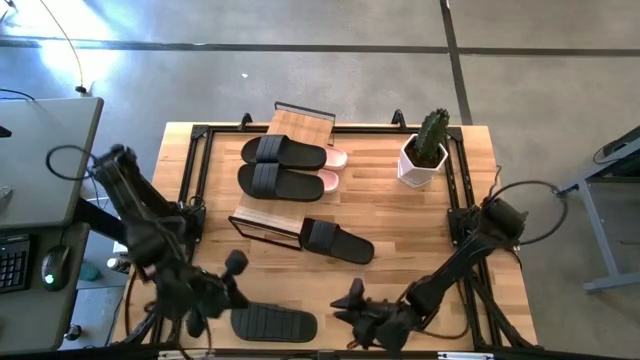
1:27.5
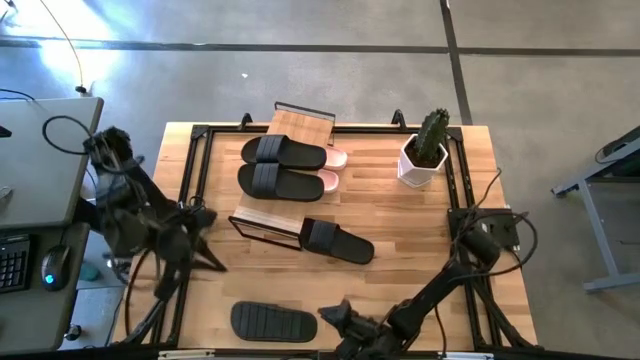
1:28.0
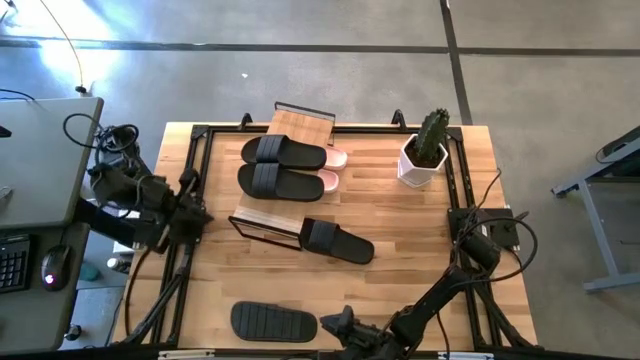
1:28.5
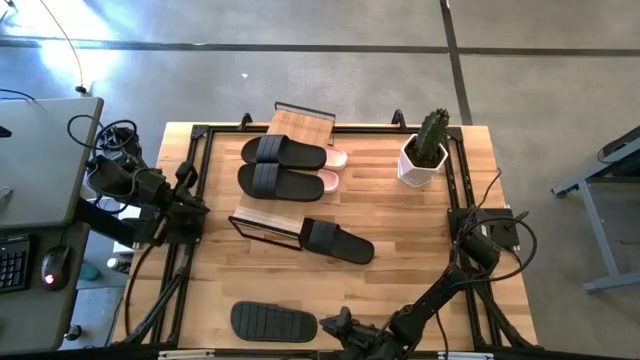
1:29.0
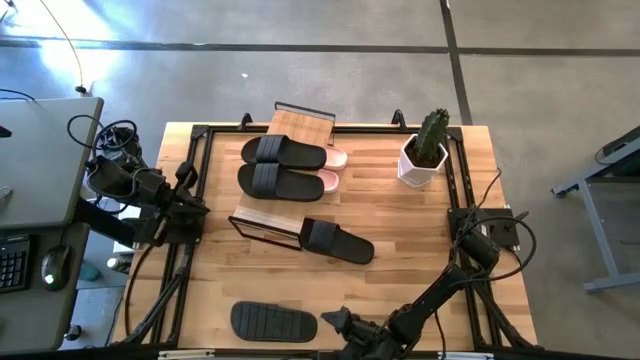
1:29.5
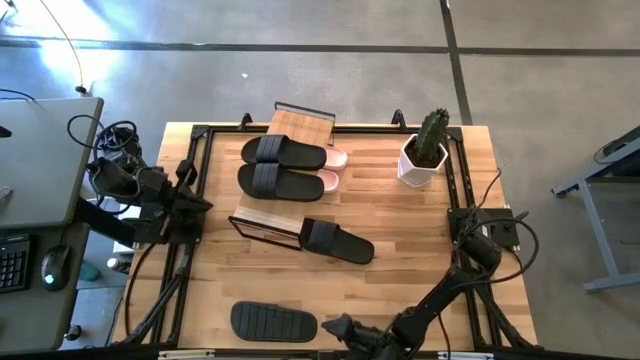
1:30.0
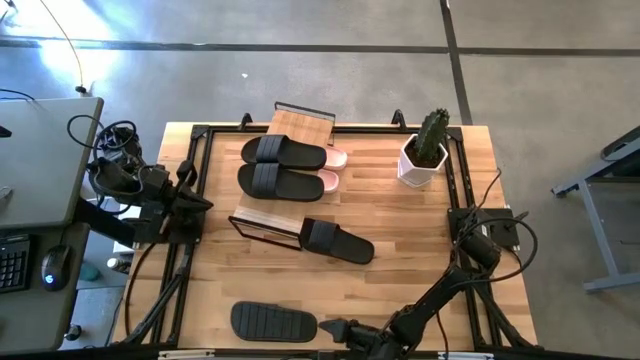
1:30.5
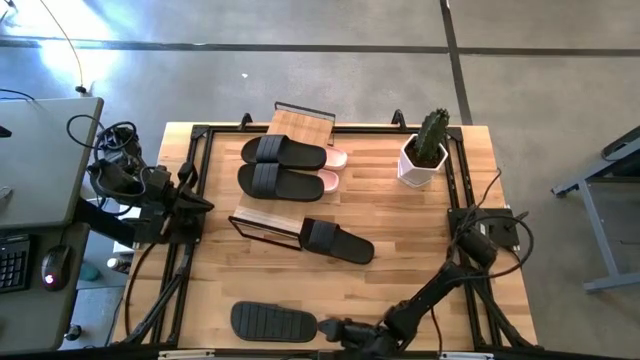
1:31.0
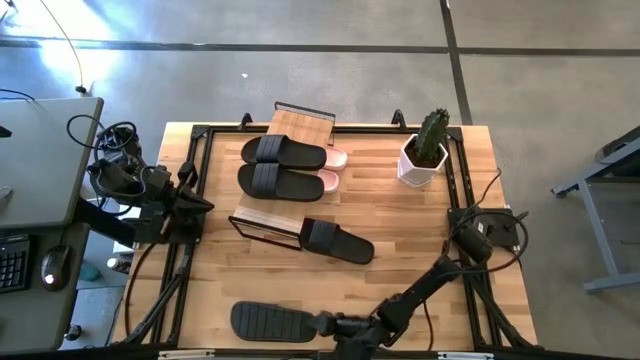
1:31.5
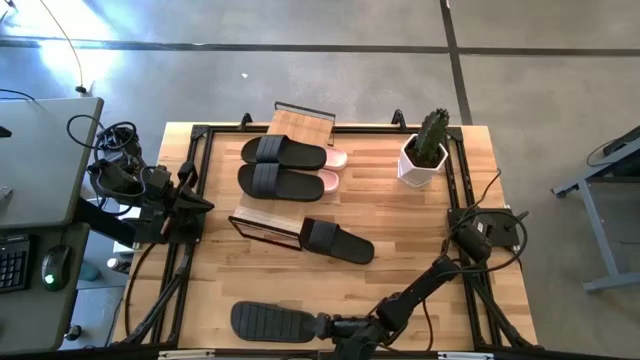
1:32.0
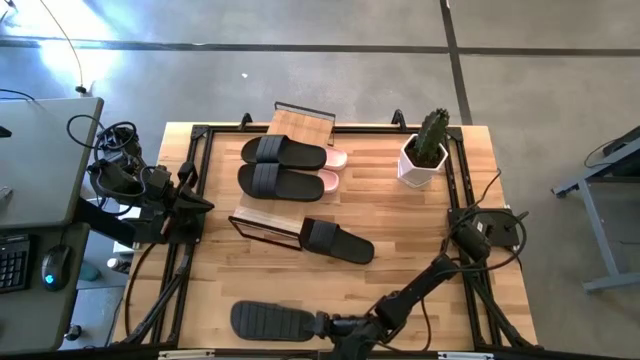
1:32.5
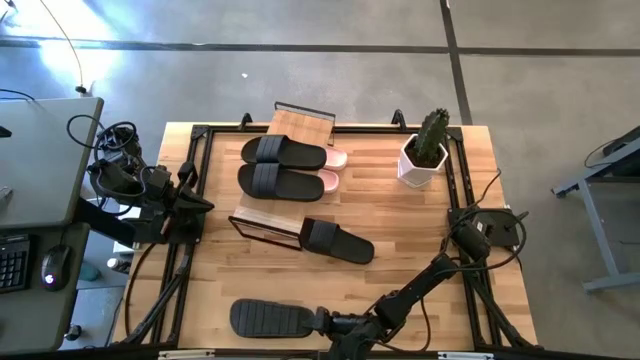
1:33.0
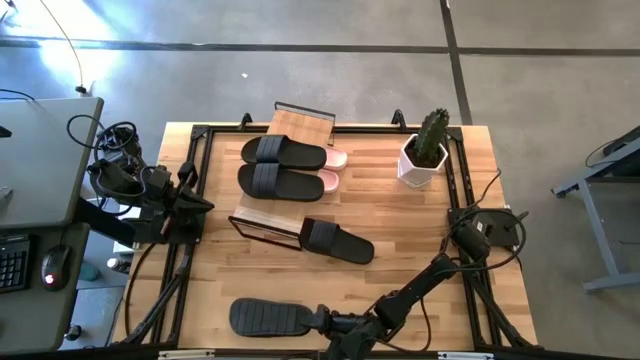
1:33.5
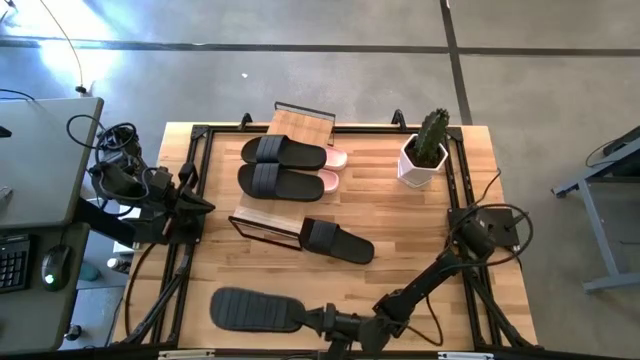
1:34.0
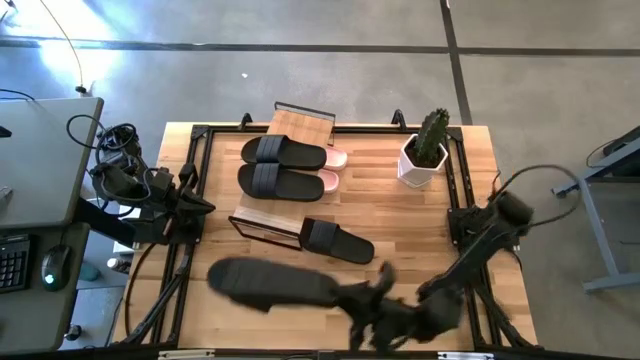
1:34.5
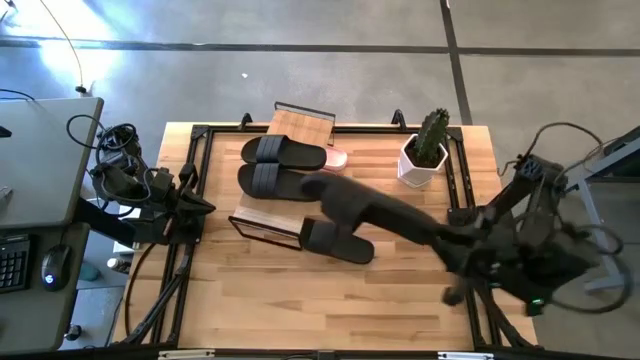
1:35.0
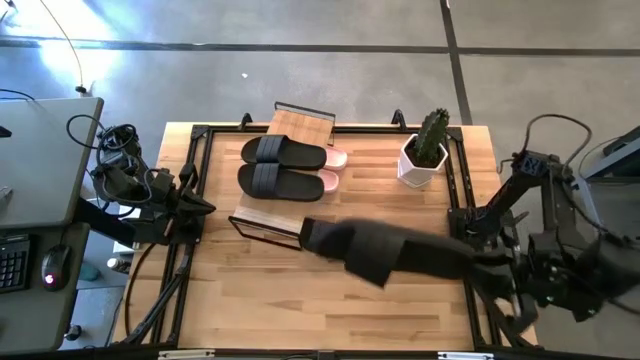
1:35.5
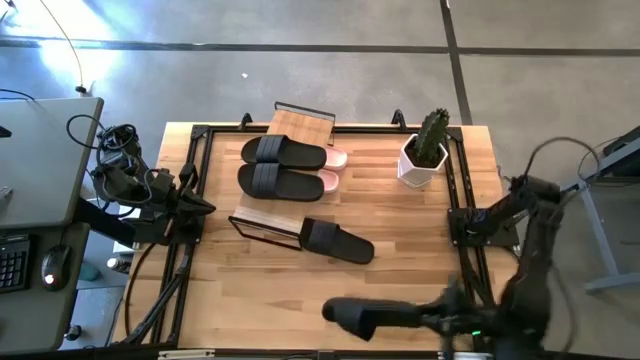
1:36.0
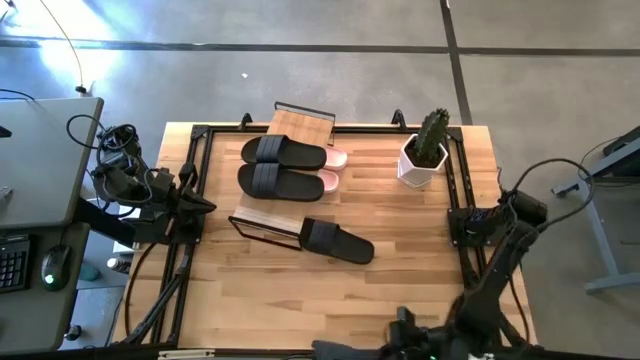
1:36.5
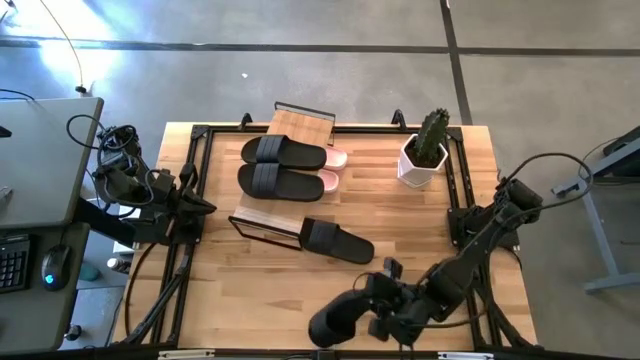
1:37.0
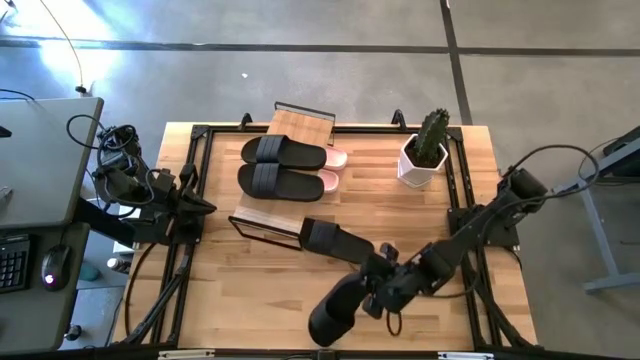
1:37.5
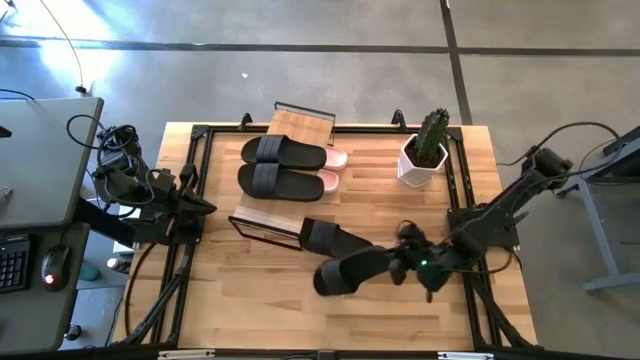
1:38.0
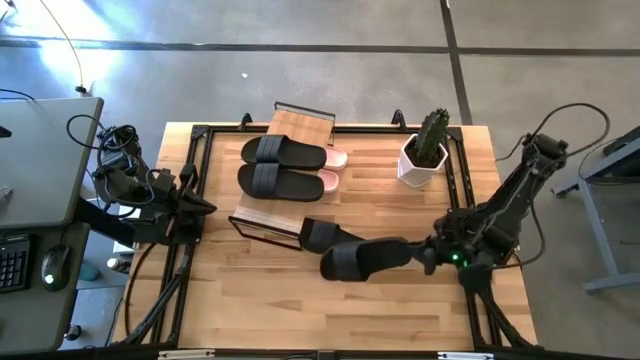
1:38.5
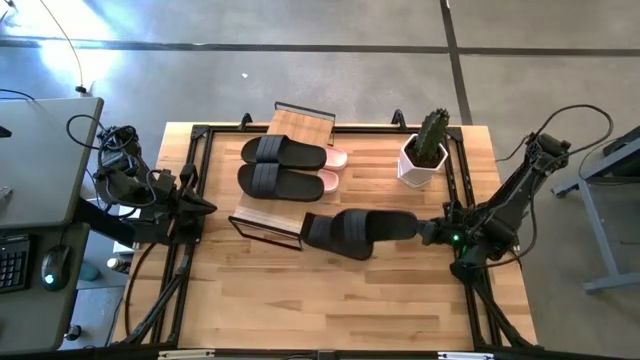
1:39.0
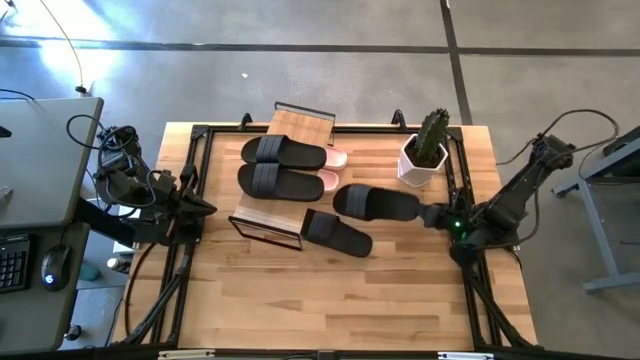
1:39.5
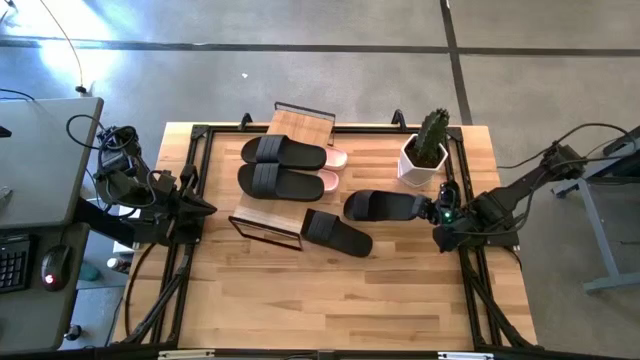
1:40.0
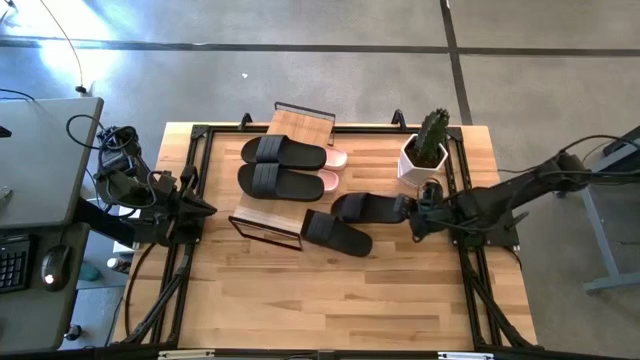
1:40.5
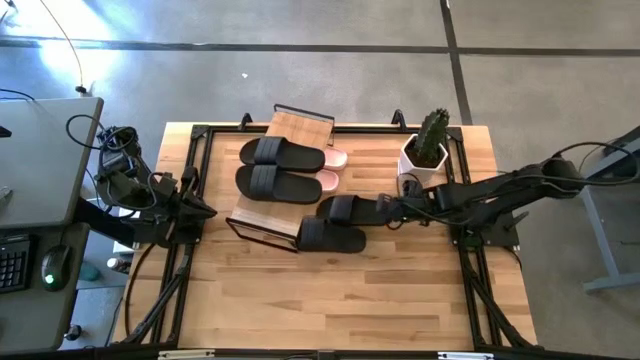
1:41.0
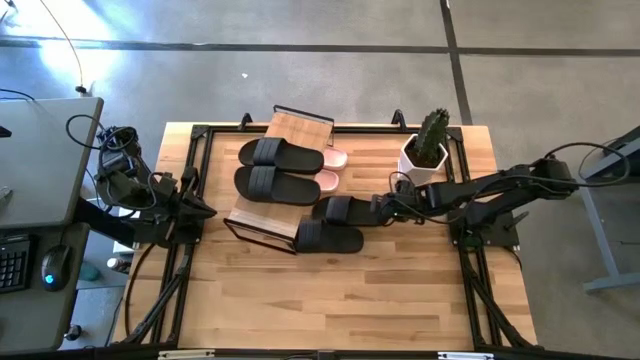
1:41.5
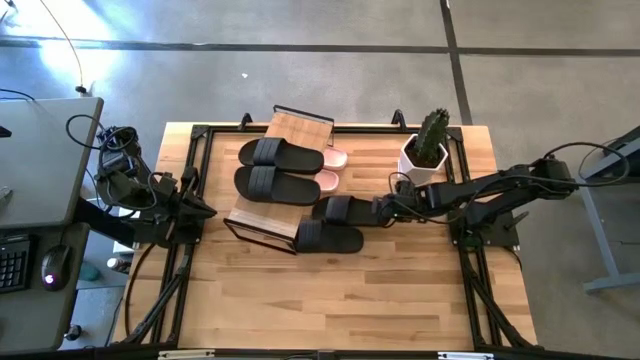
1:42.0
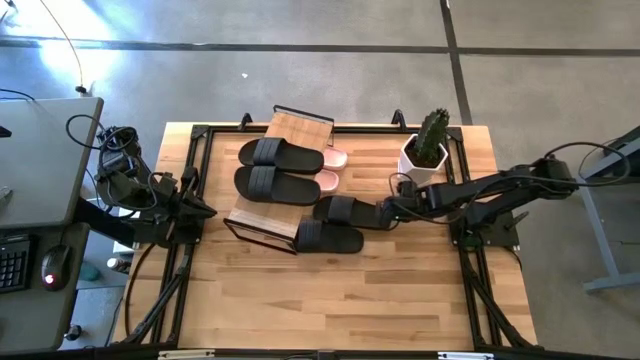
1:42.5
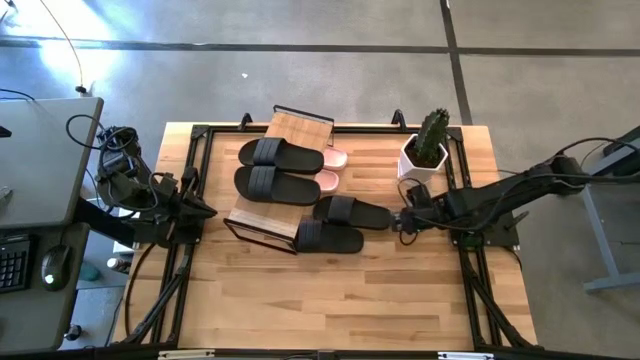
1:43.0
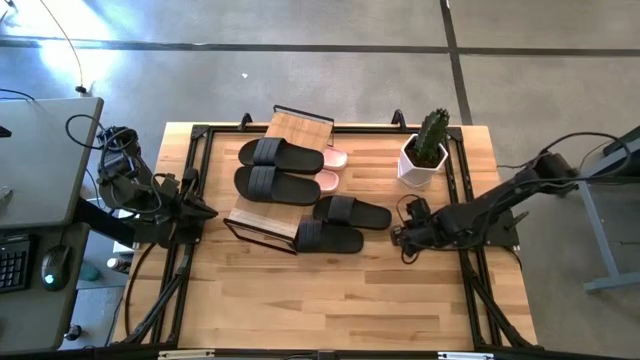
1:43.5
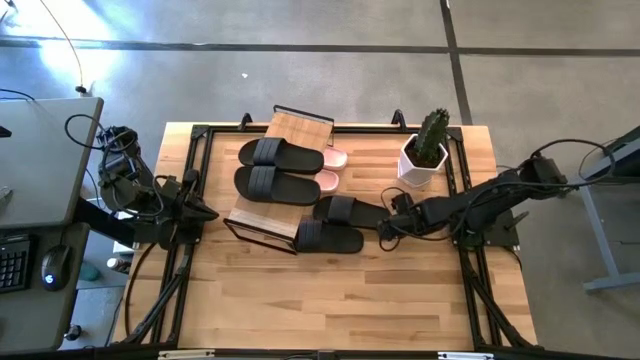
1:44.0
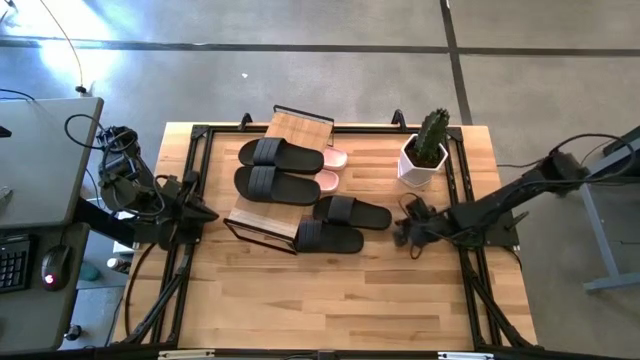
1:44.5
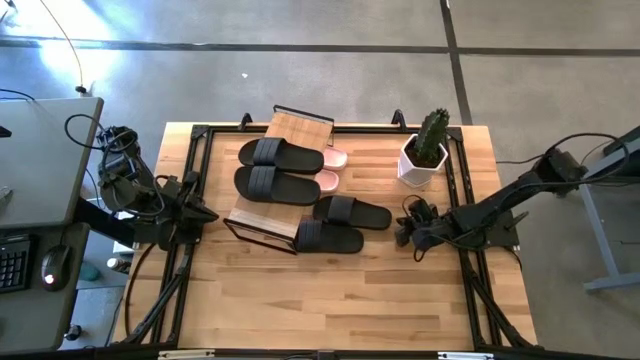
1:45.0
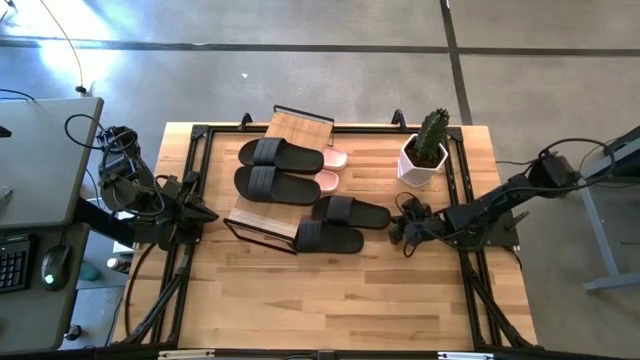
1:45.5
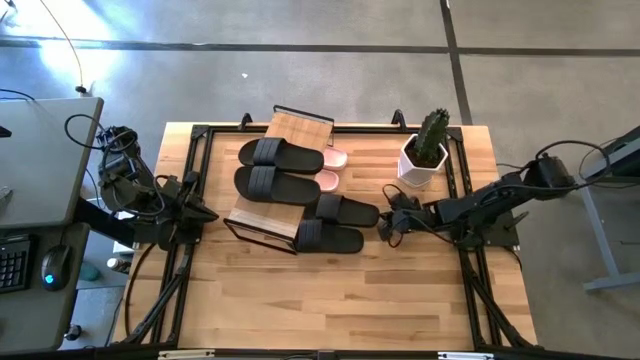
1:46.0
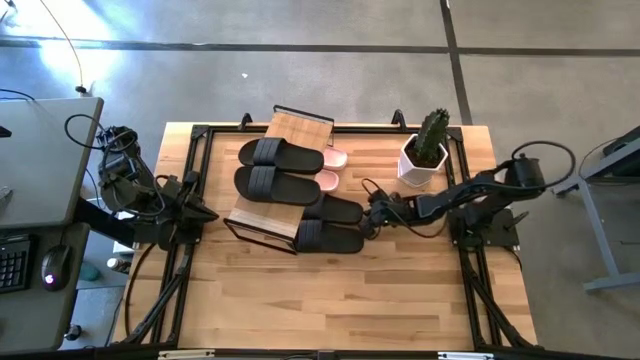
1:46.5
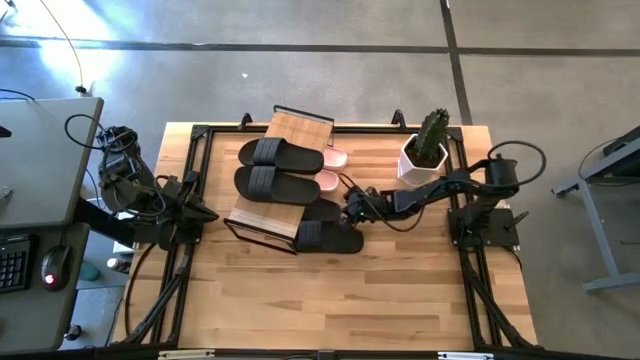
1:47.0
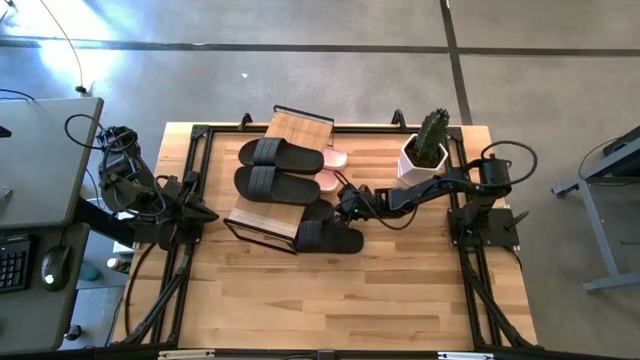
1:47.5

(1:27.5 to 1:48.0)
Task: Pick and place slides into the shelf
Put the black slides under the shelf
